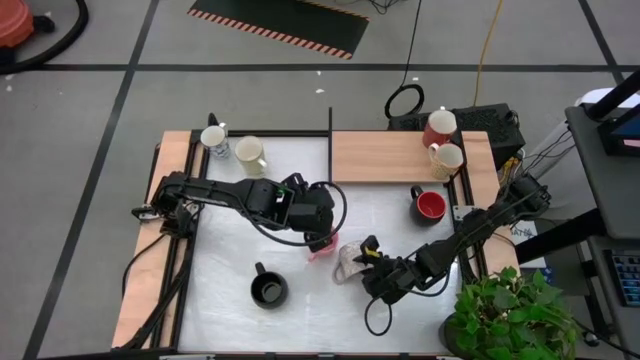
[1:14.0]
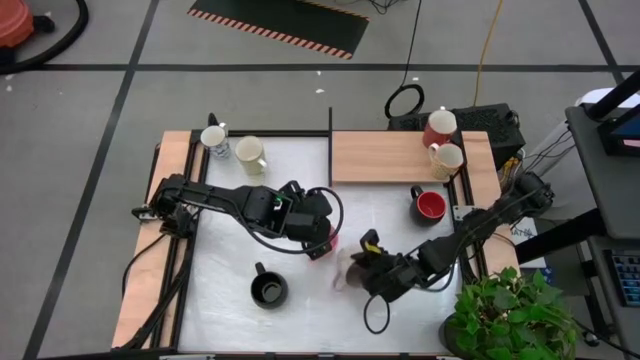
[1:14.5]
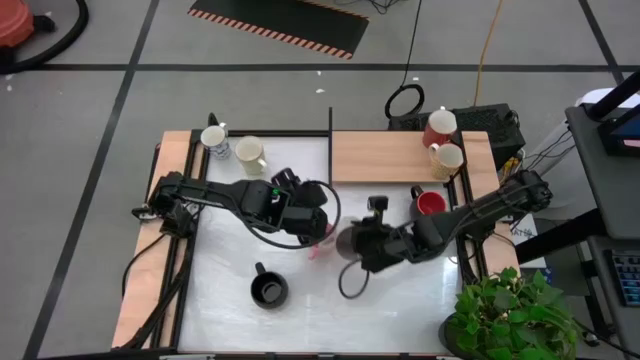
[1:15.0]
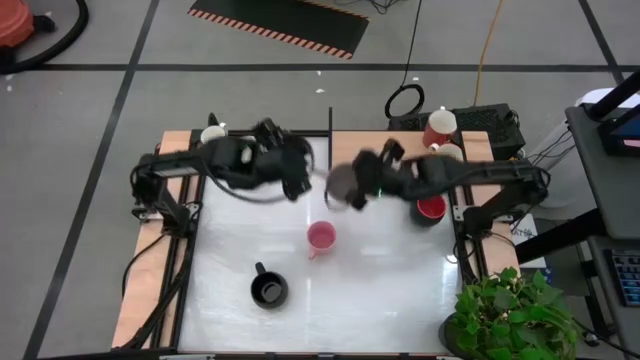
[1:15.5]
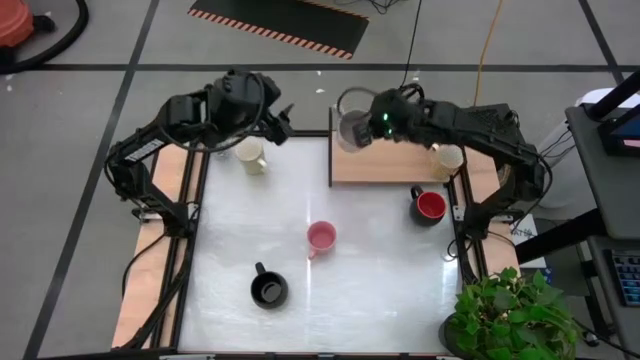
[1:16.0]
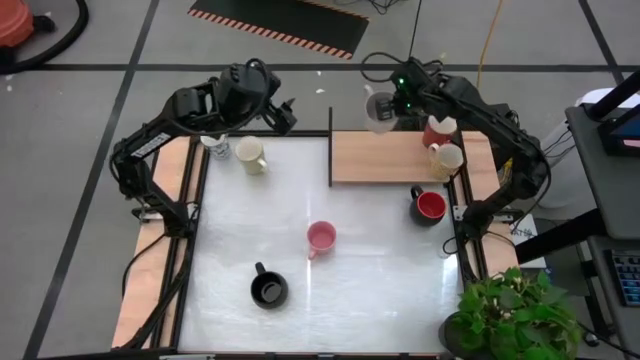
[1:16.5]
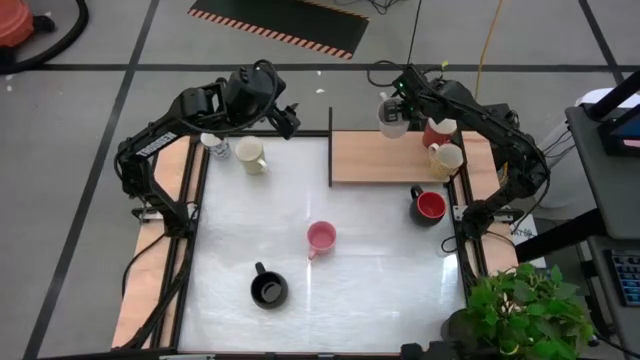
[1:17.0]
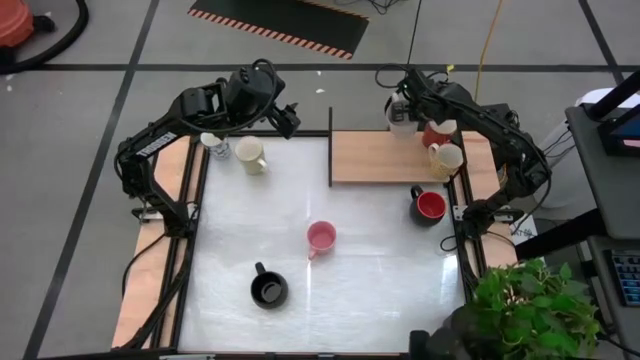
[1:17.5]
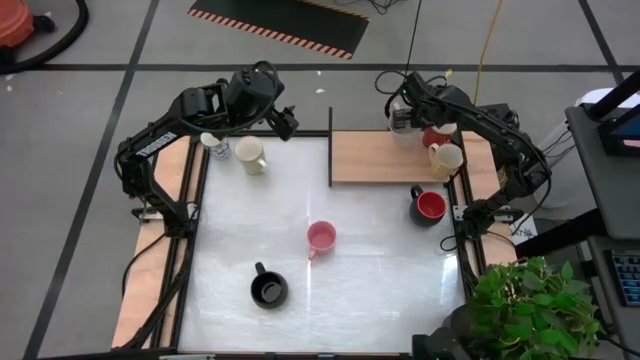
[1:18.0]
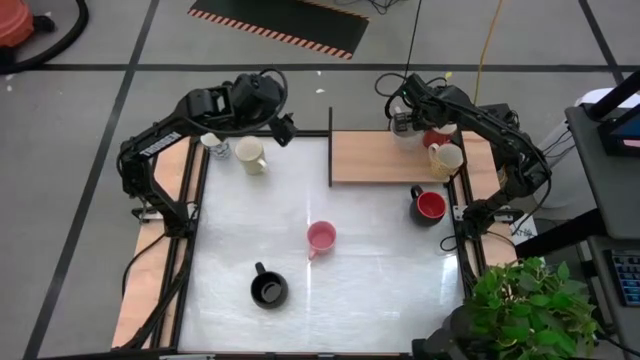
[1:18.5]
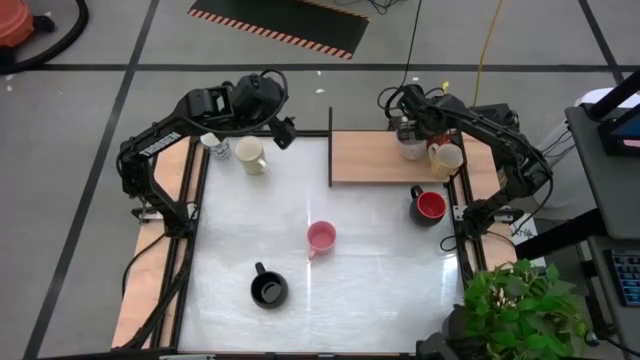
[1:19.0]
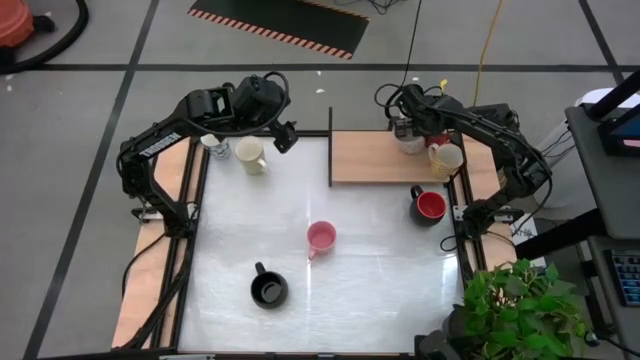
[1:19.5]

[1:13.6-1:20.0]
Task: Place coffee mugs
Put the gray mug on the shelf

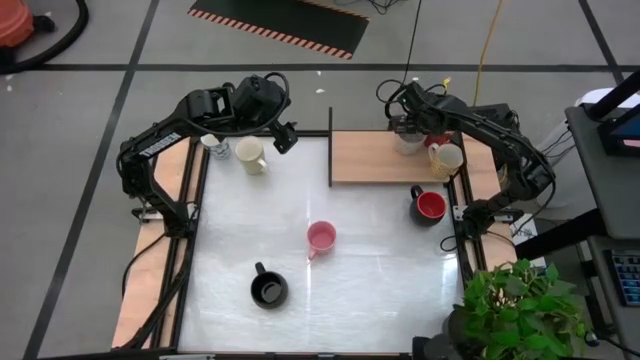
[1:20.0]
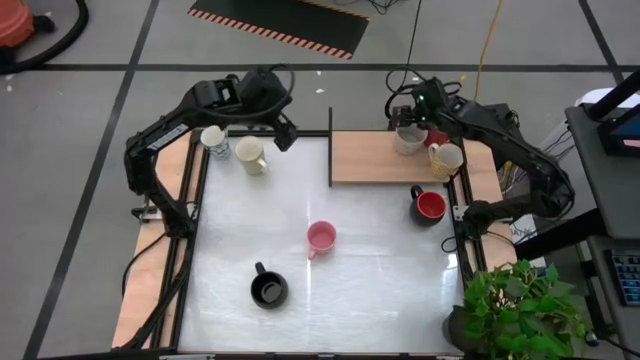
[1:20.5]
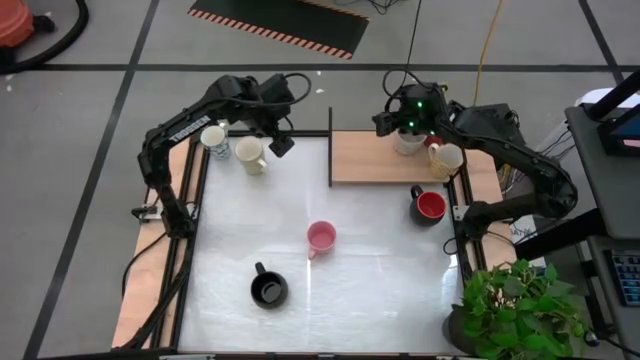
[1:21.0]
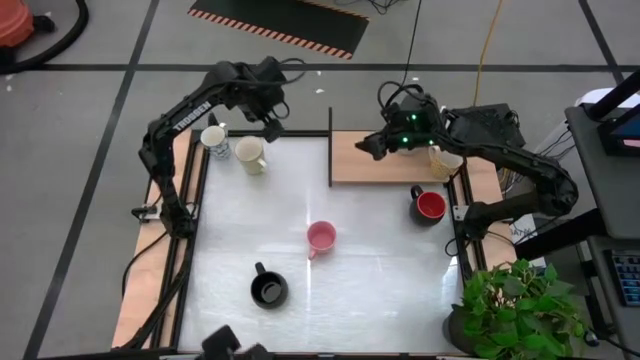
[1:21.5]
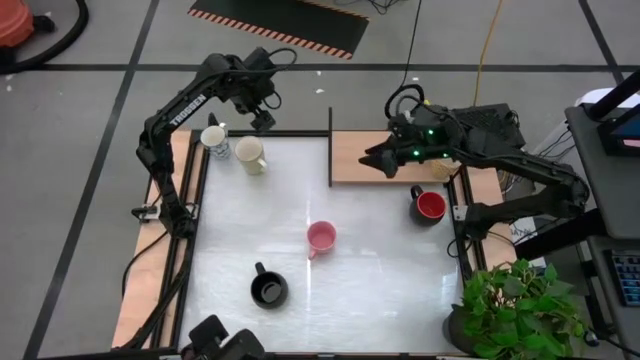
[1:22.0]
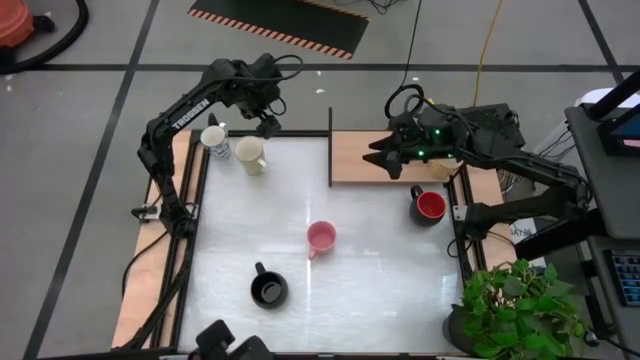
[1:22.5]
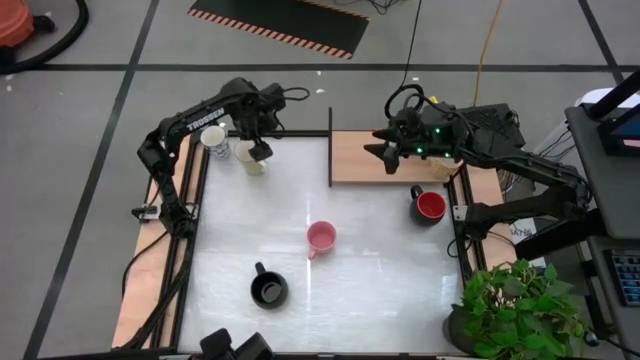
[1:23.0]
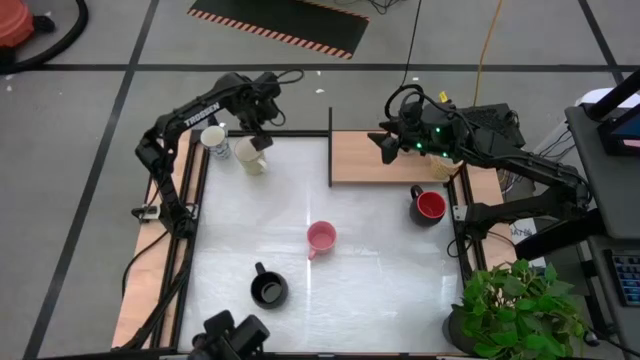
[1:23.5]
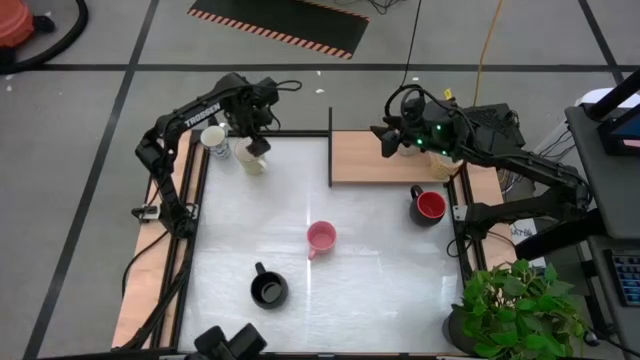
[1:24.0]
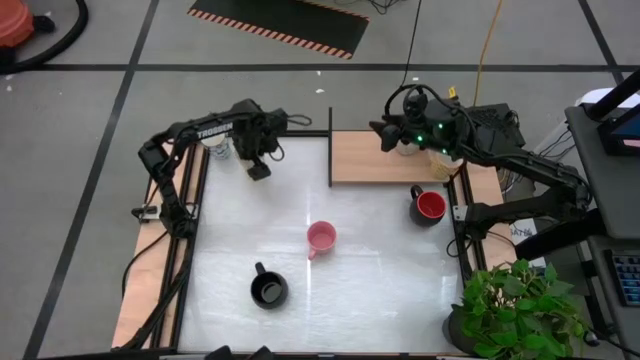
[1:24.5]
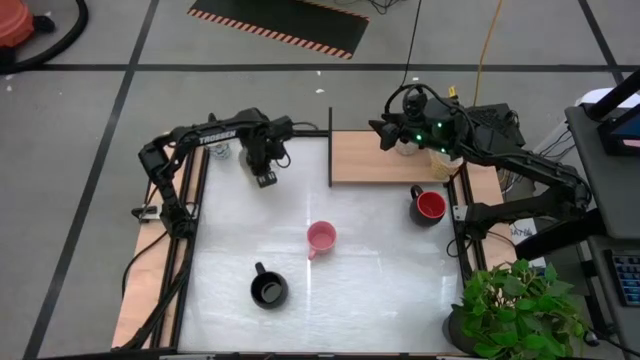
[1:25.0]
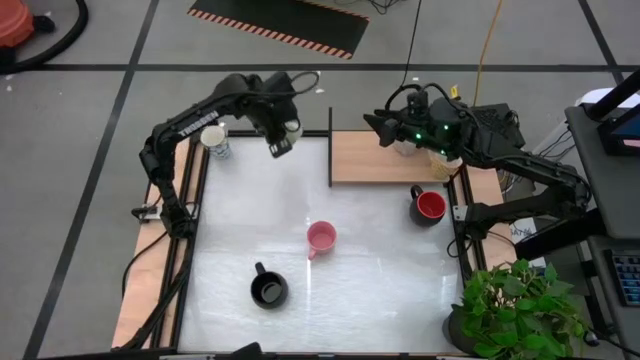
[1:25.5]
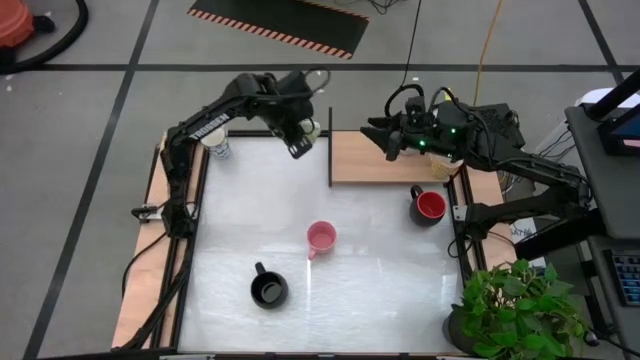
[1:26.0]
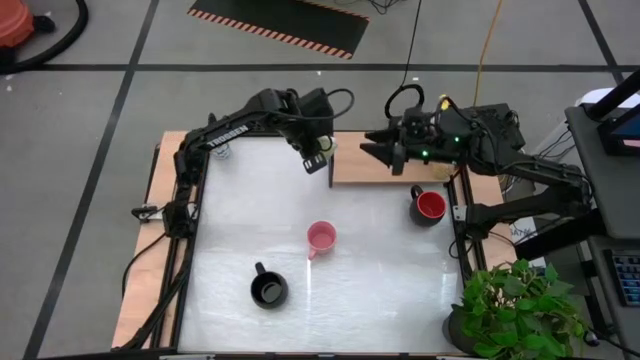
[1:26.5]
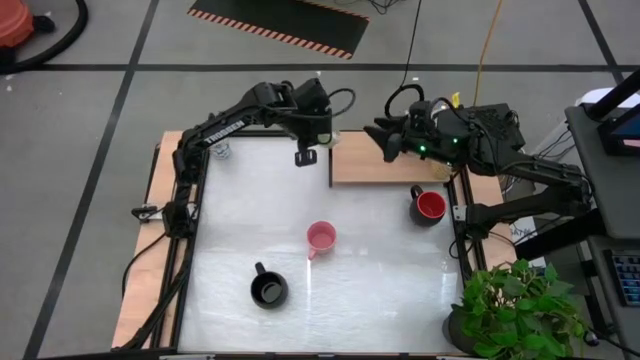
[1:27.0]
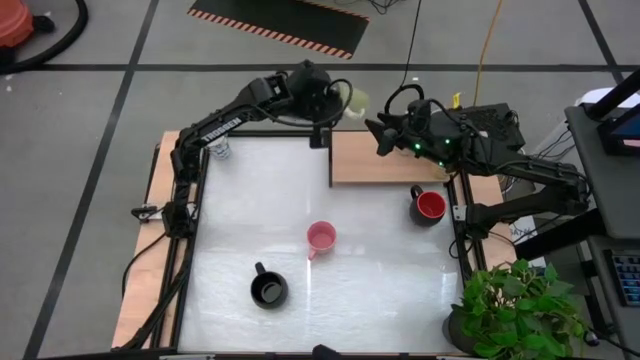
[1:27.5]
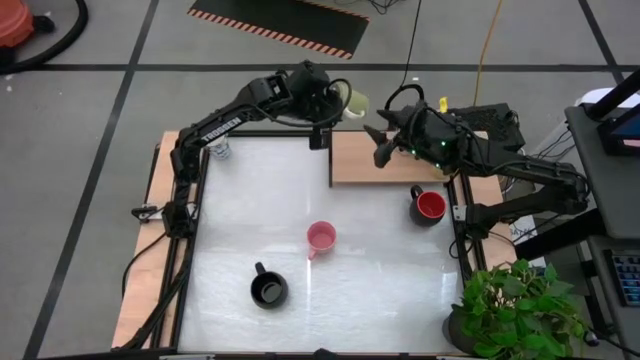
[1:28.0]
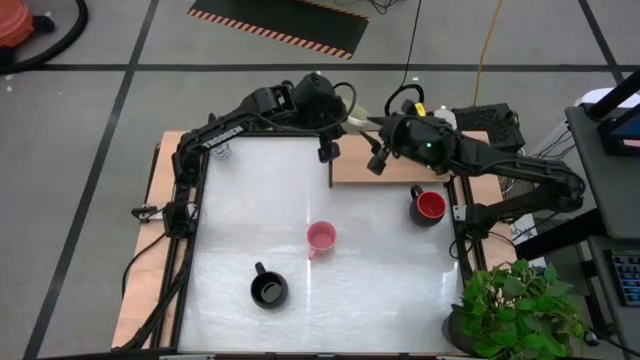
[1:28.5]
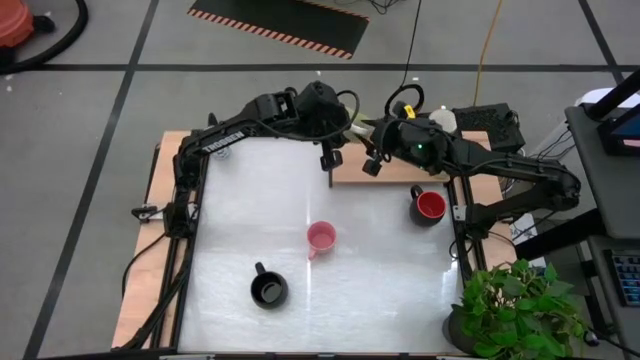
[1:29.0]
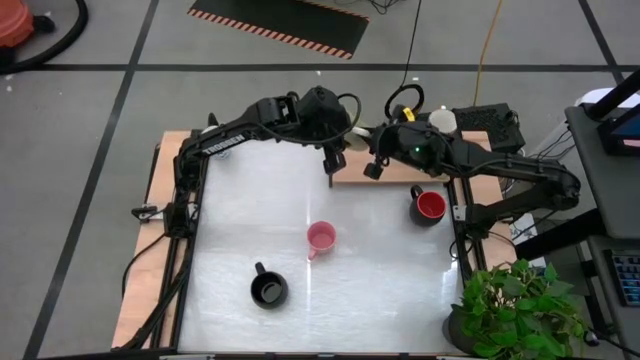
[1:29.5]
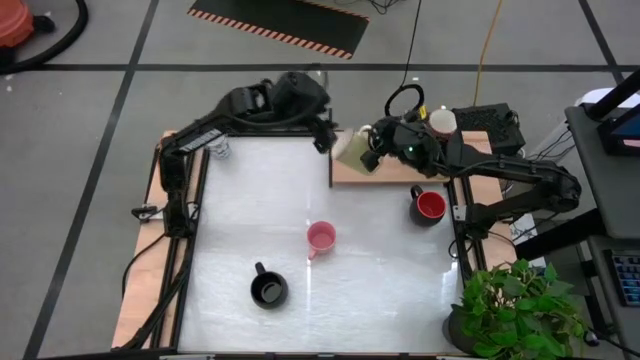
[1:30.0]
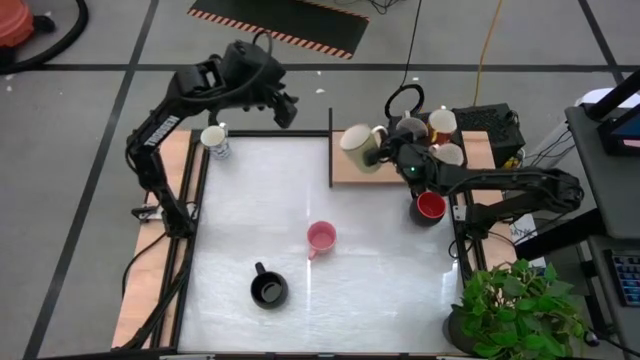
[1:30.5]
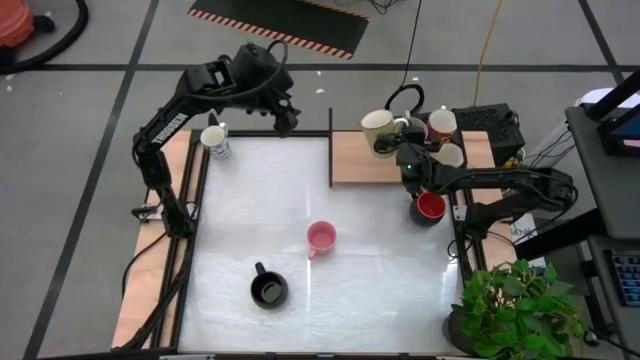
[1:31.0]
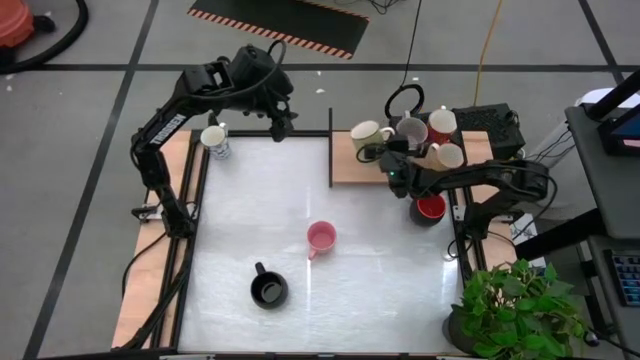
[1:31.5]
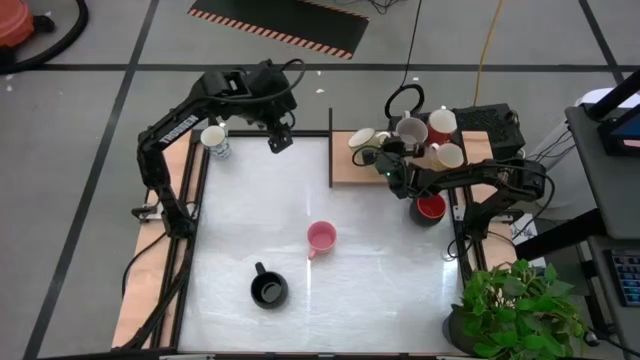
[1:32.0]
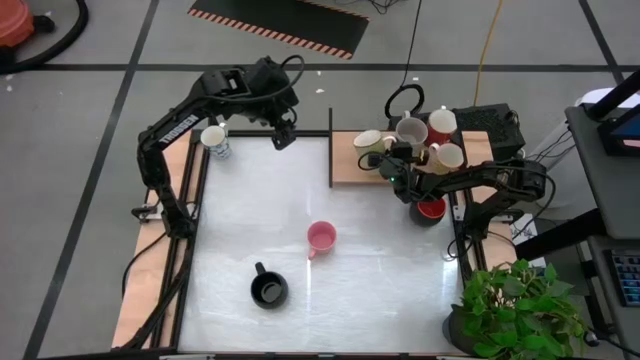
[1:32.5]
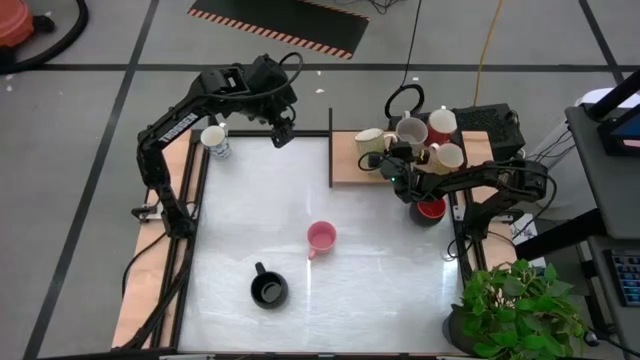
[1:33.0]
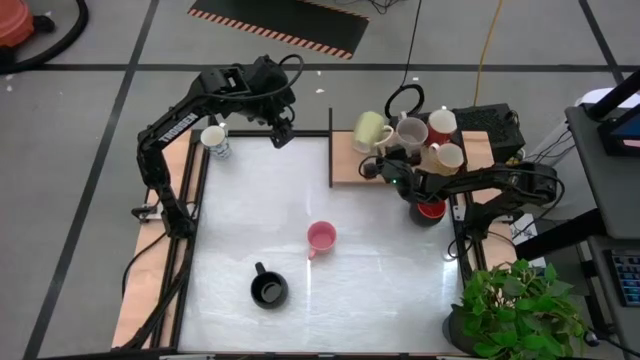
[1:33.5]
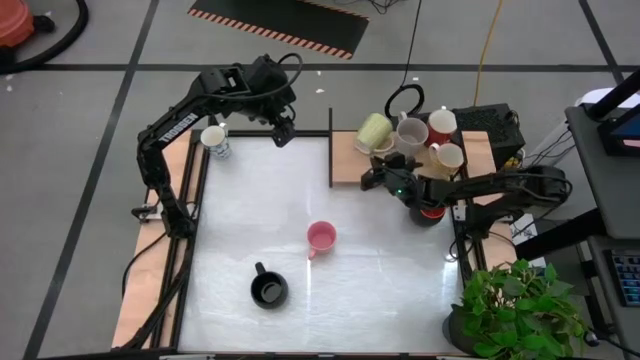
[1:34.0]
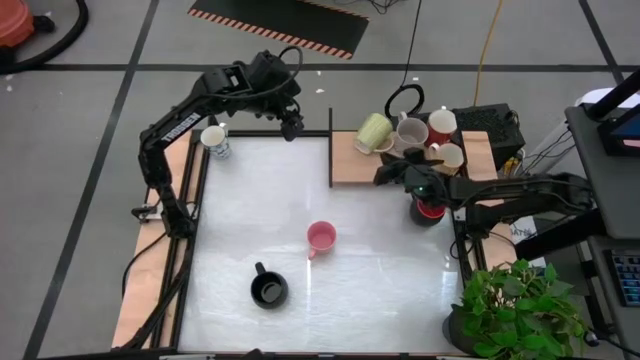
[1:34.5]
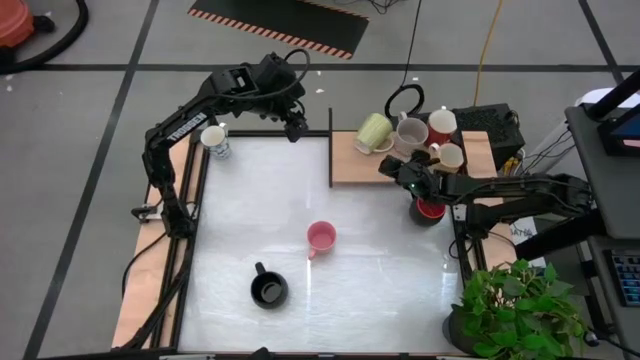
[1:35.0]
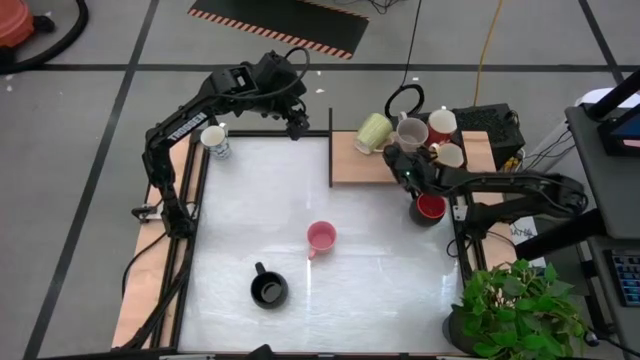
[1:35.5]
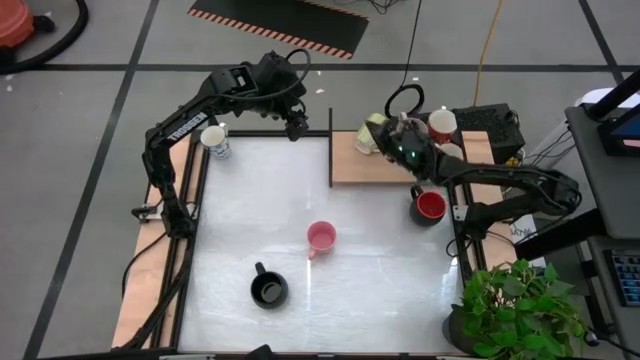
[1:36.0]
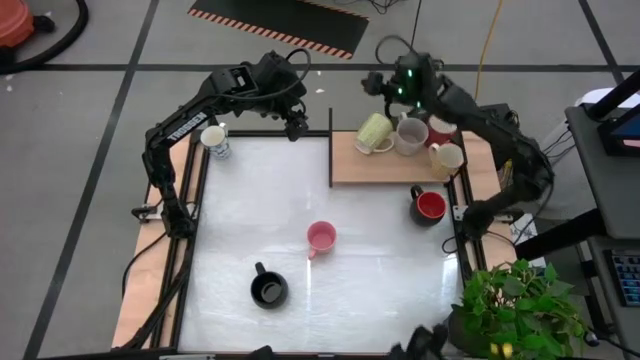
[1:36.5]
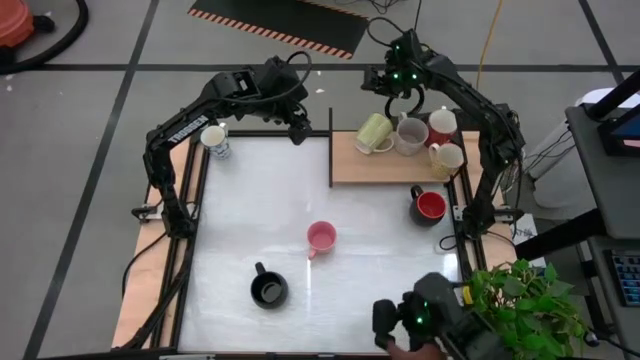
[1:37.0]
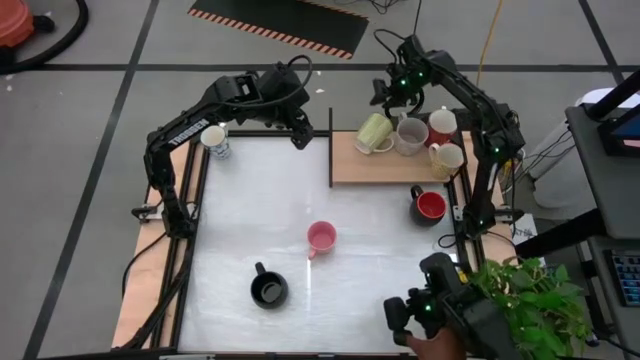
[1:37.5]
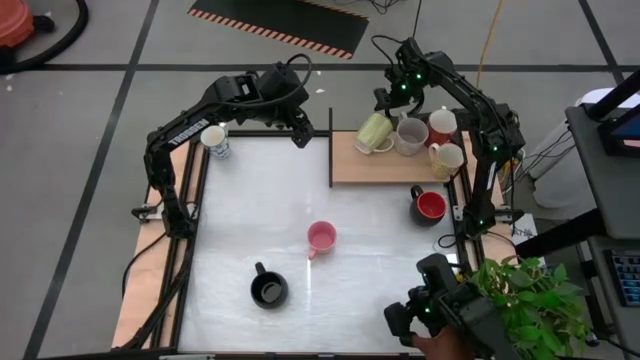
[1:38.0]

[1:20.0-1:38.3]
Put the green mug on the shelf
